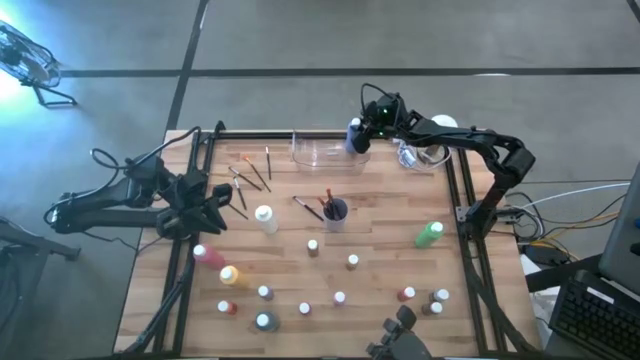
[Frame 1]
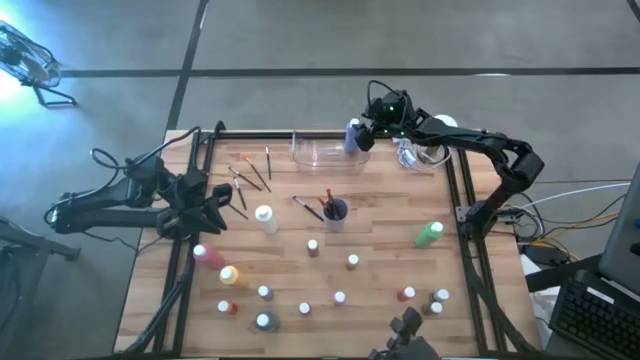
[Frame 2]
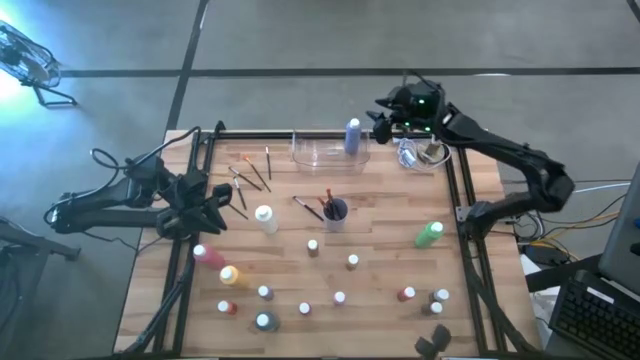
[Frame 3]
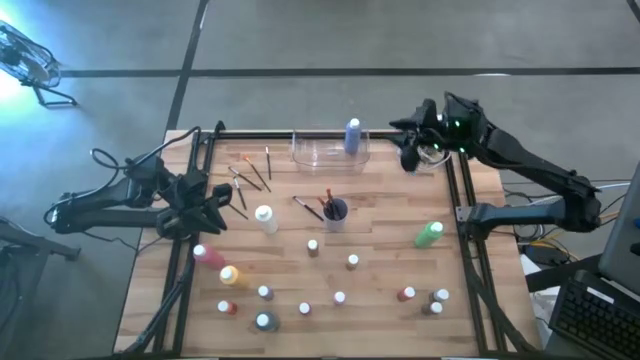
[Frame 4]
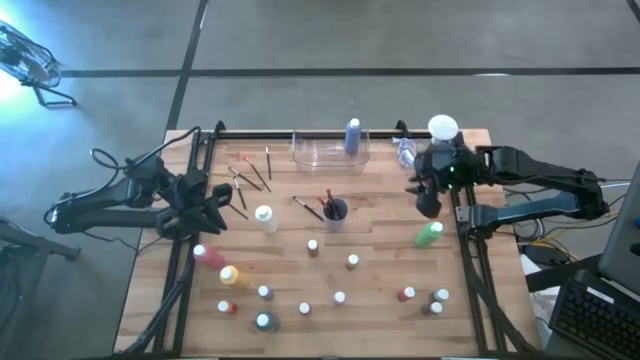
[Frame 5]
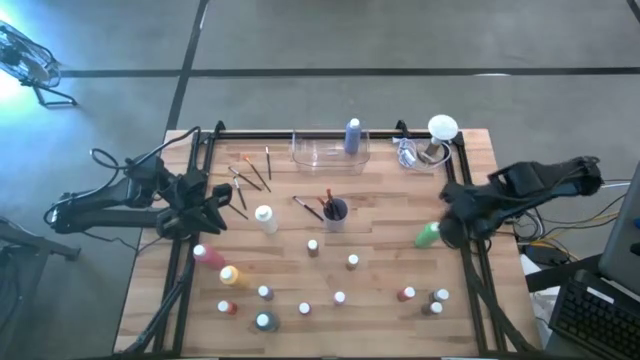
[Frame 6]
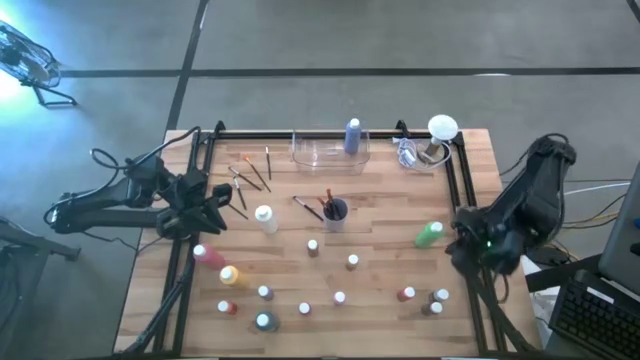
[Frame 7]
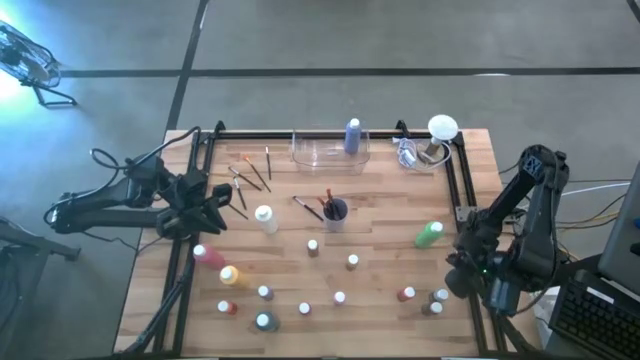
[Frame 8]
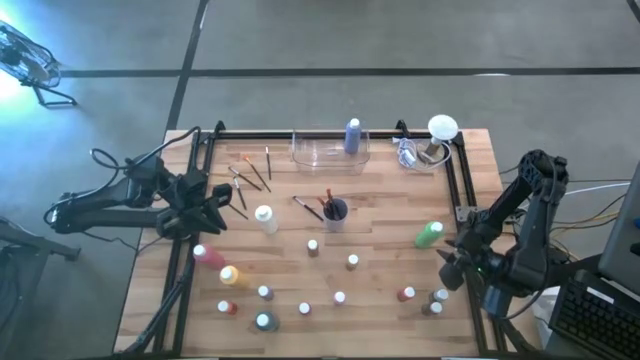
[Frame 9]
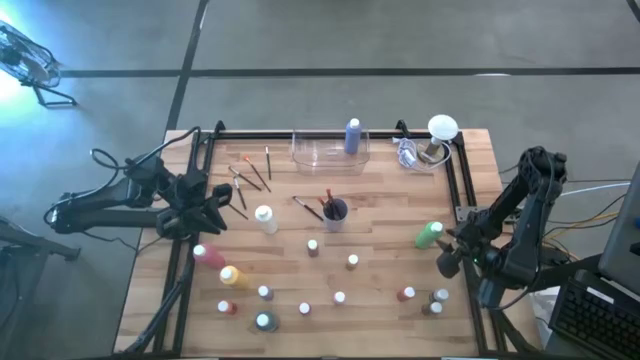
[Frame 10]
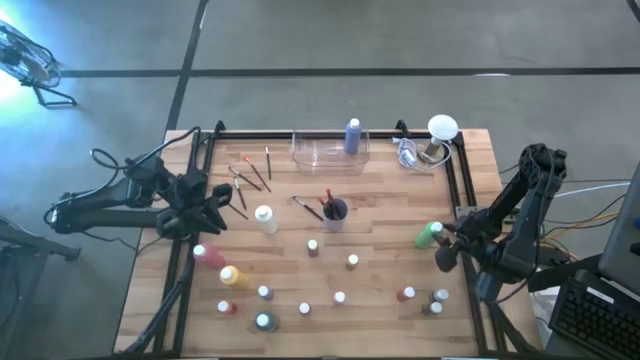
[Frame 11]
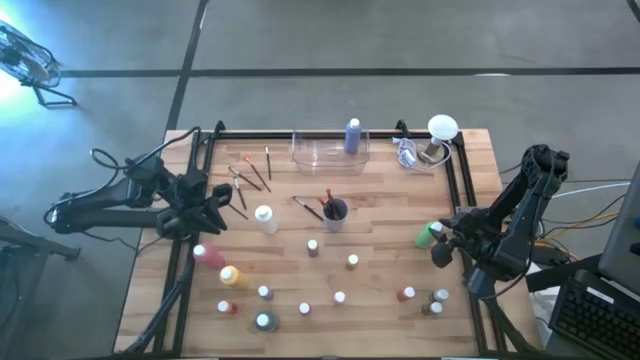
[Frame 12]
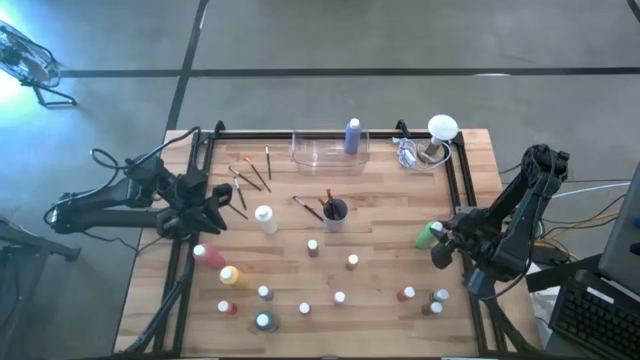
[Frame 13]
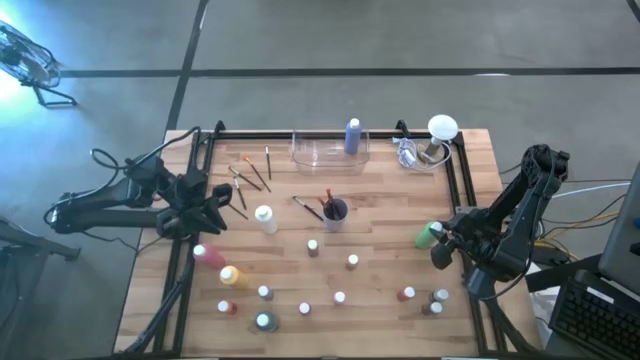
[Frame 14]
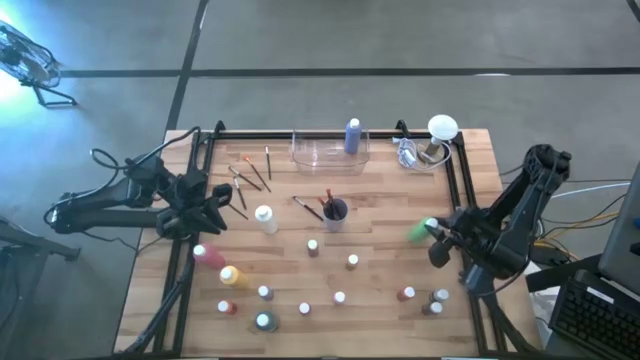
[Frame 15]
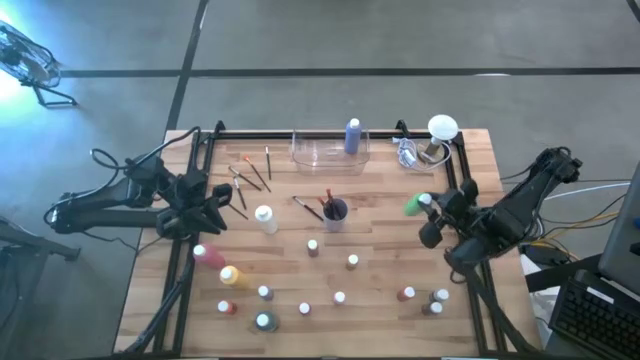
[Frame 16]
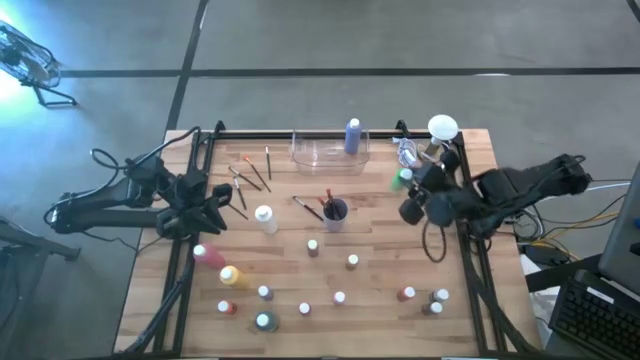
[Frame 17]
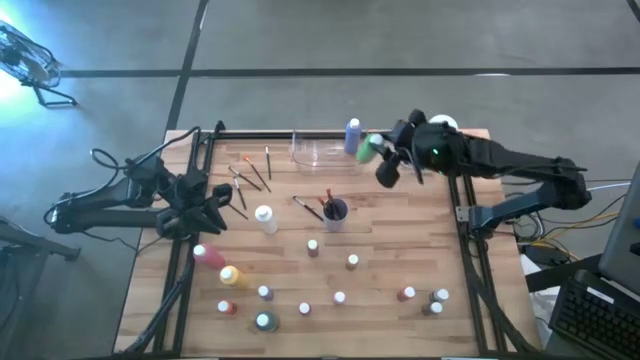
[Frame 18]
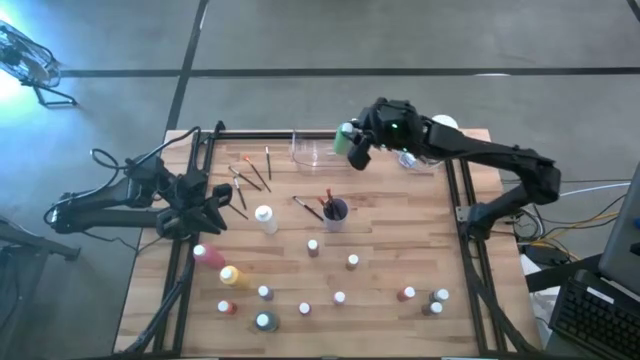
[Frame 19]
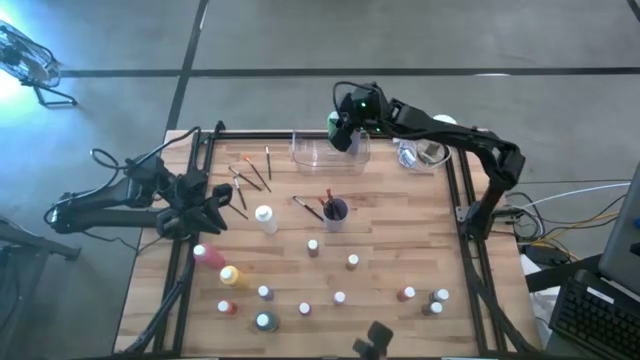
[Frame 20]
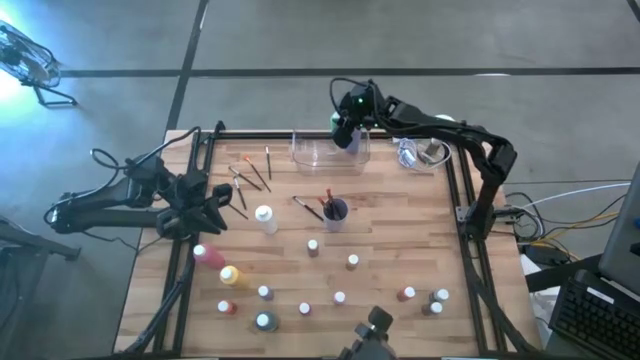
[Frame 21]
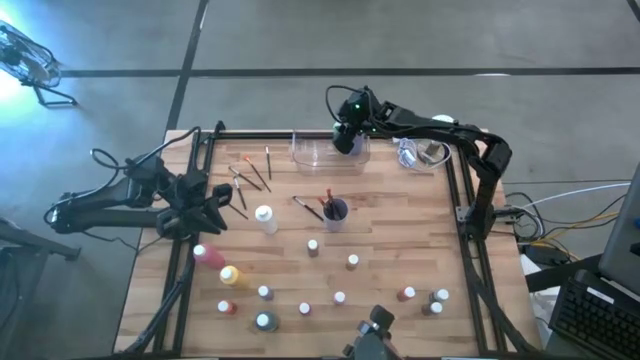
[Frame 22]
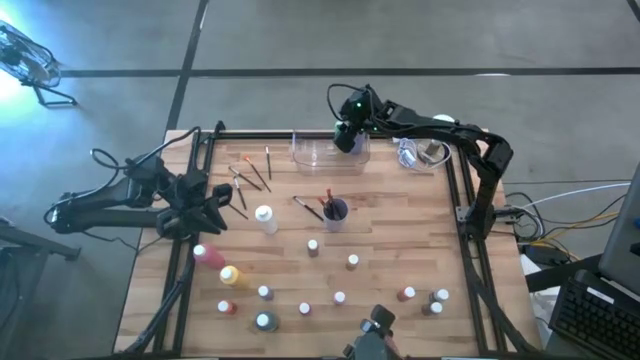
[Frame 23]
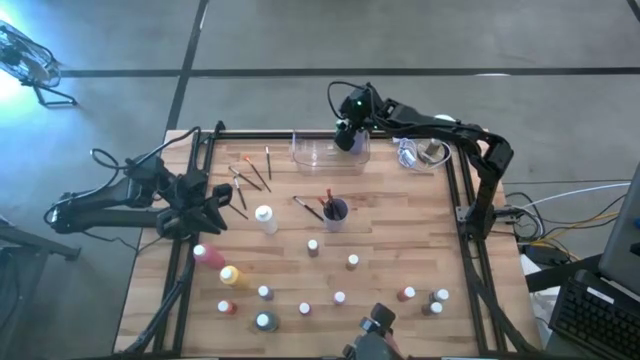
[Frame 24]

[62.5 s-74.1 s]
Task: Pick & Place Paint Supplies
Put the green paint bottle into the transparent bin

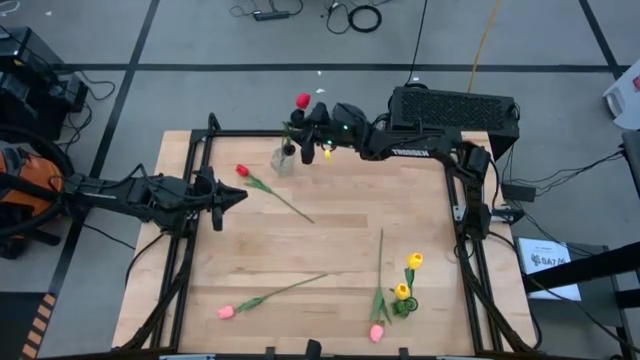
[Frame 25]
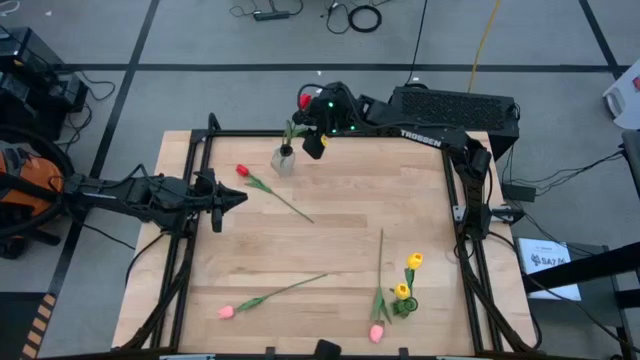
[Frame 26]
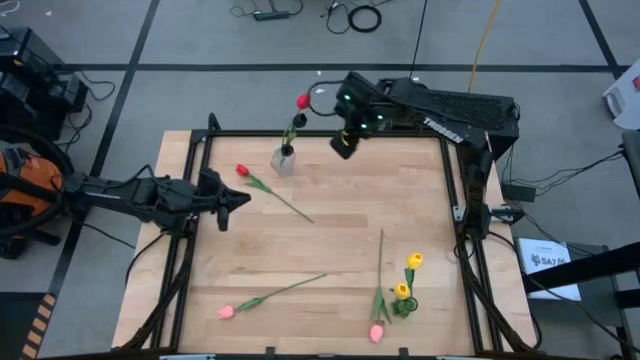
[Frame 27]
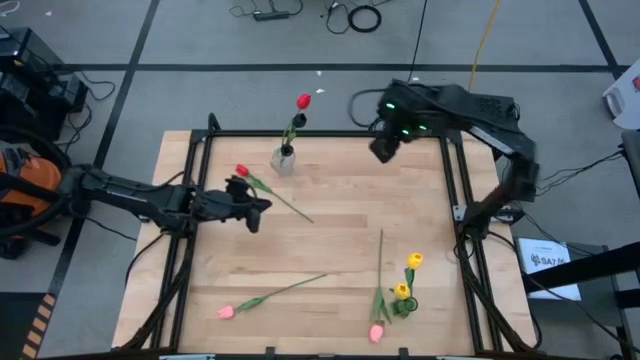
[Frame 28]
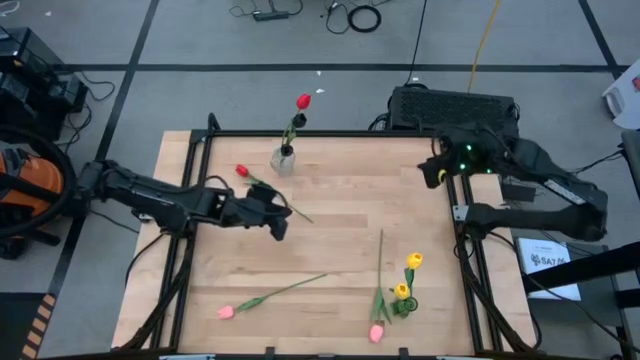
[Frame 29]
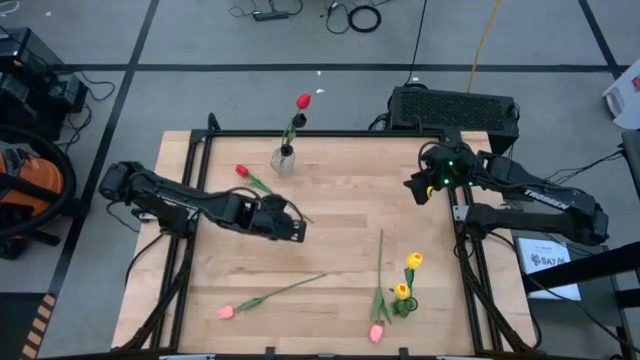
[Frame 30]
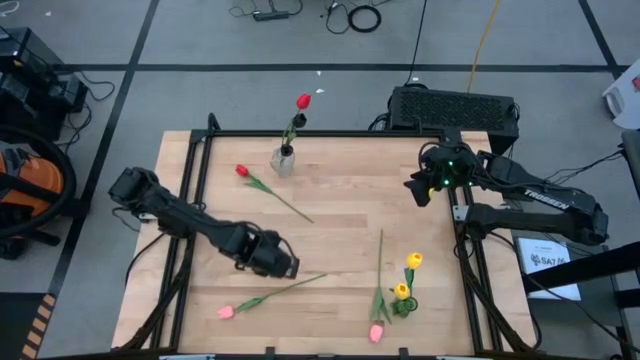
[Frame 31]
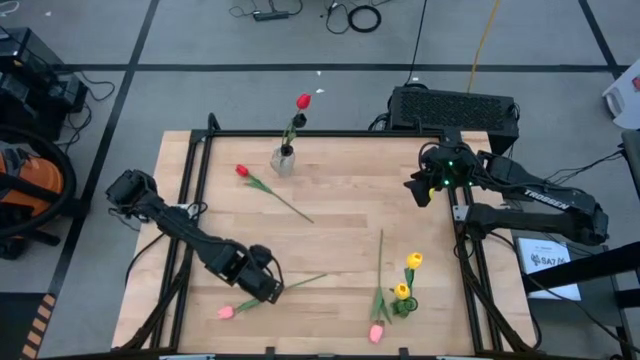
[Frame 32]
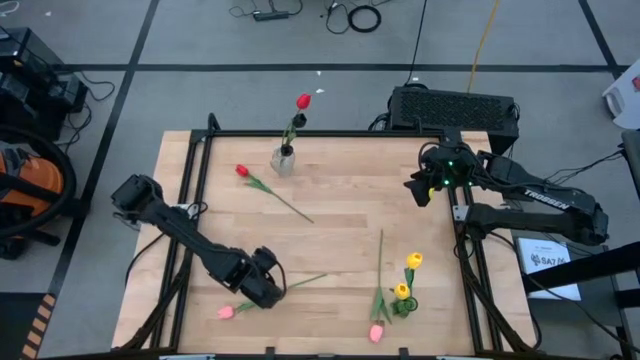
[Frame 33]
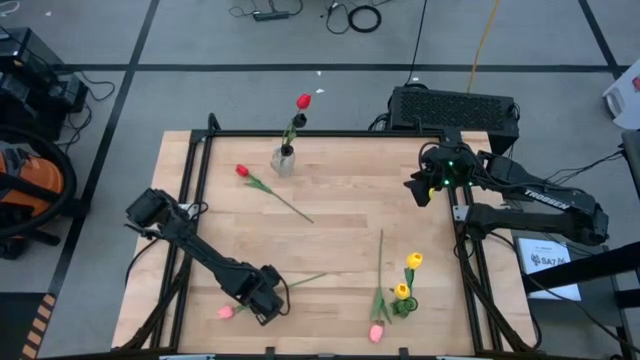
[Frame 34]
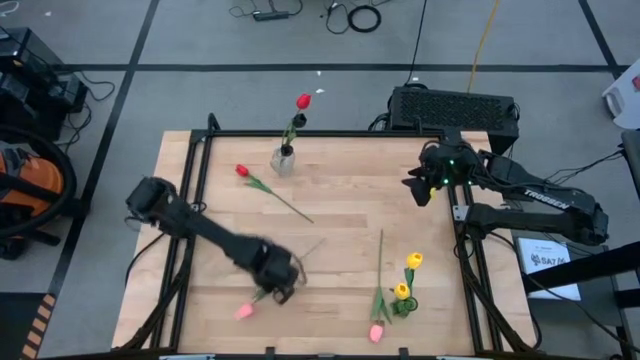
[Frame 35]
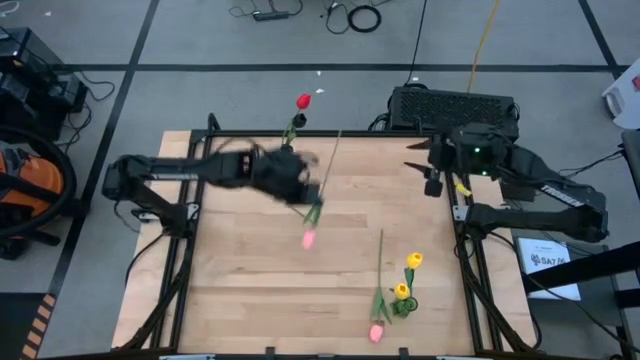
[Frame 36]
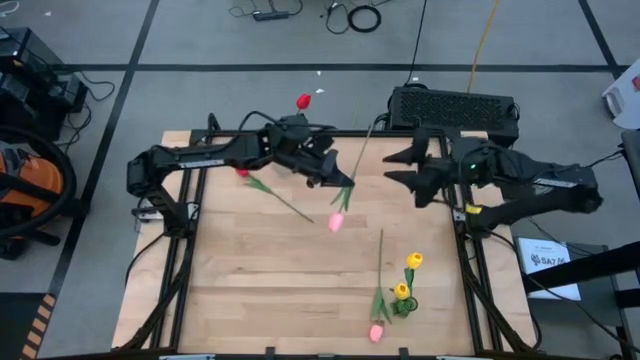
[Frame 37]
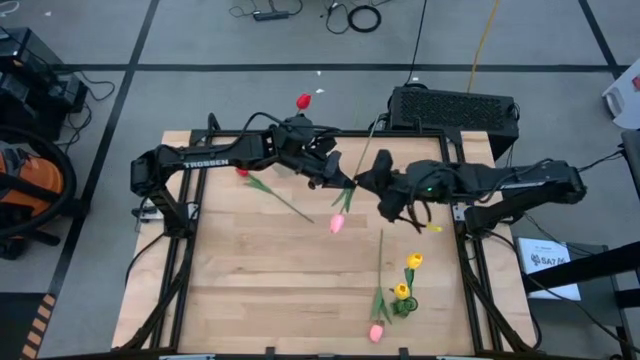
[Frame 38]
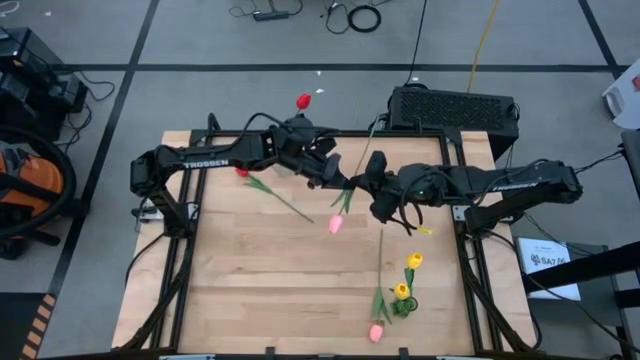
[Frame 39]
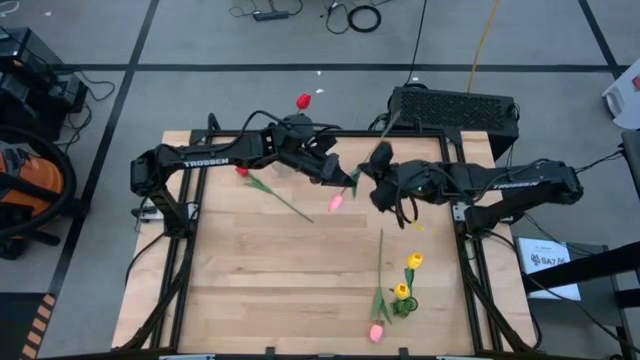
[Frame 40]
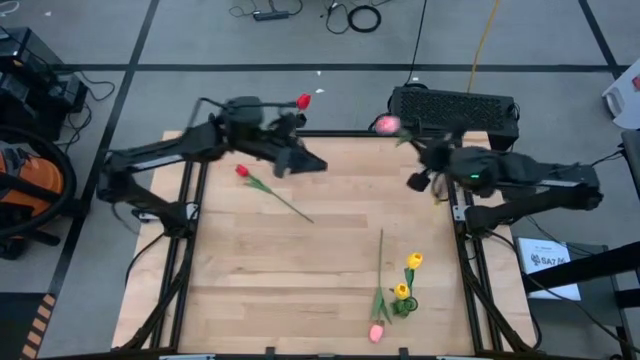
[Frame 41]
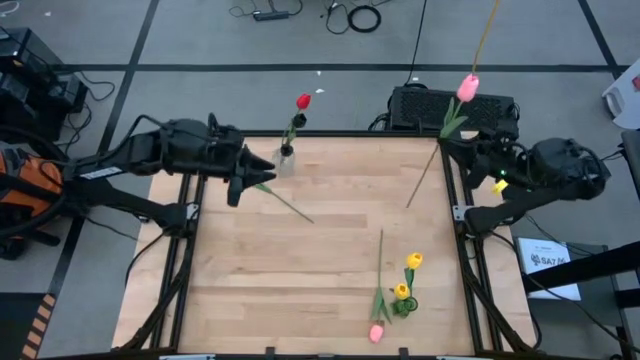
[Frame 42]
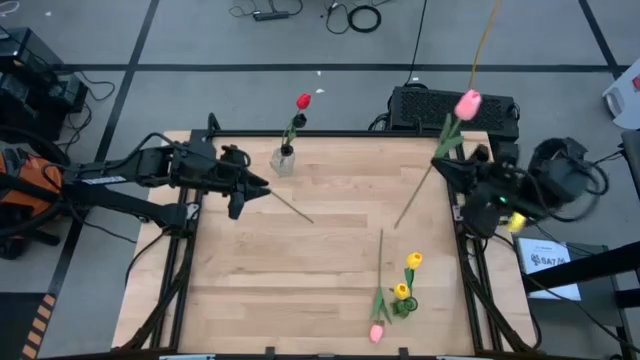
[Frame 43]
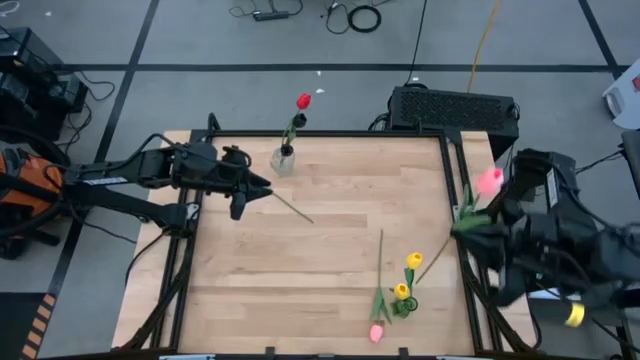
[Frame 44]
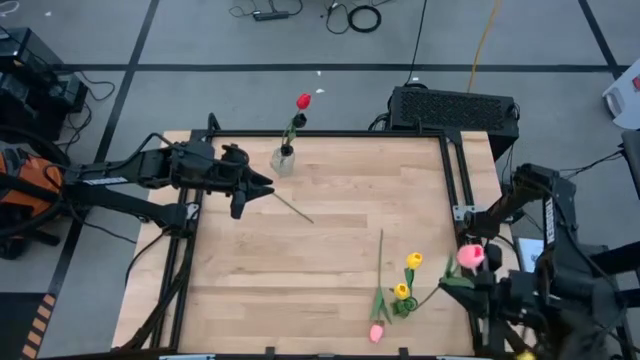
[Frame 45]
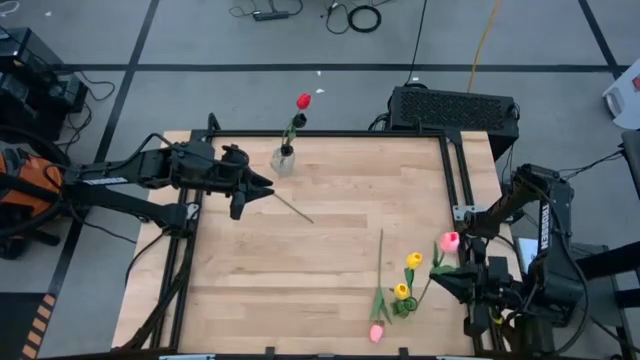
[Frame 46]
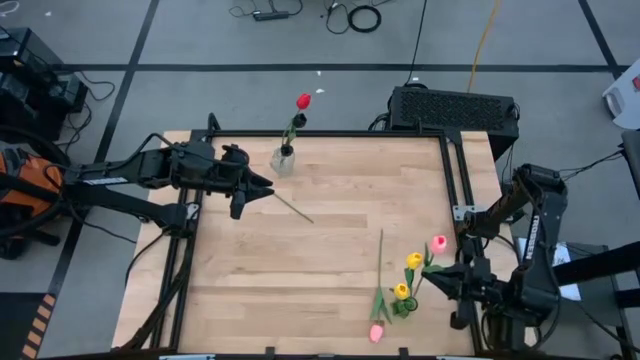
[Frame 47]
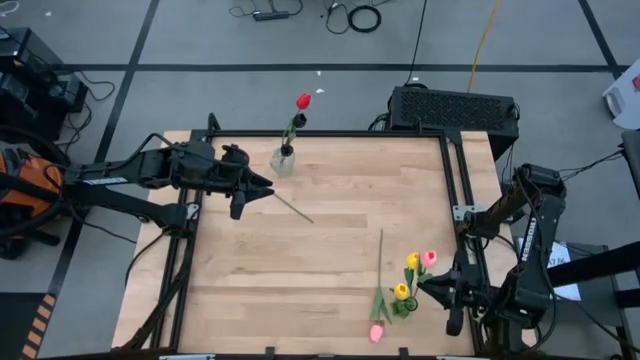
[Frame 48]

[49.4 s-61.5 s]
Task: Sort flowers into vase by color
Put the left pink tulip into the green flower vase
